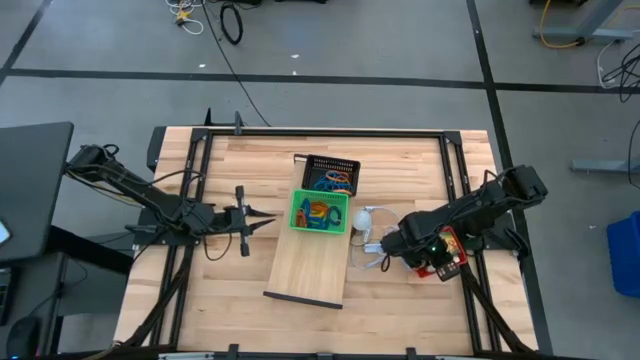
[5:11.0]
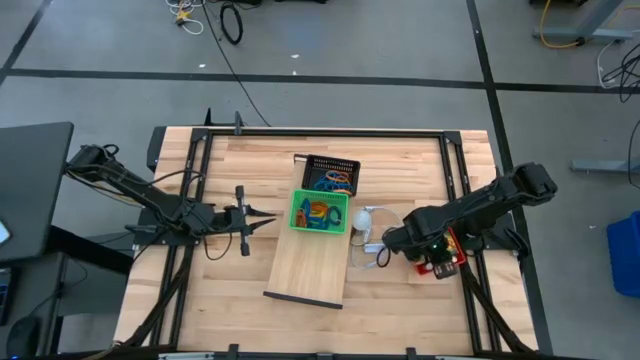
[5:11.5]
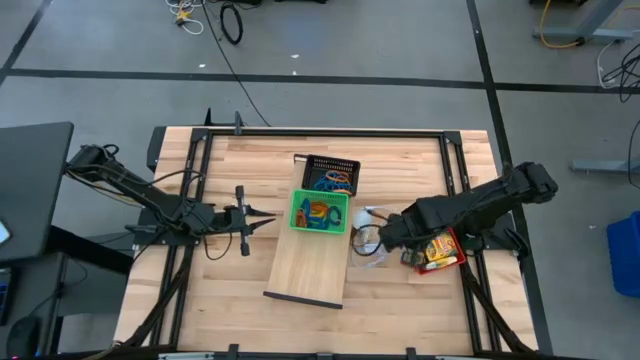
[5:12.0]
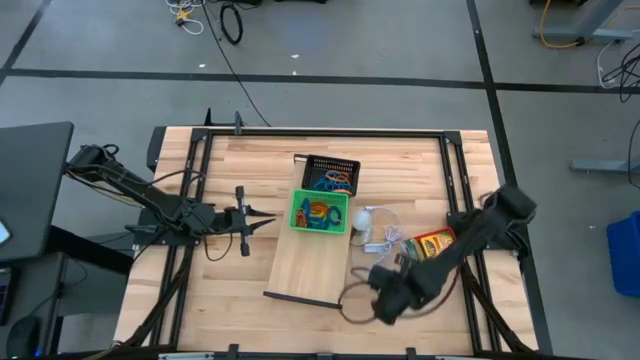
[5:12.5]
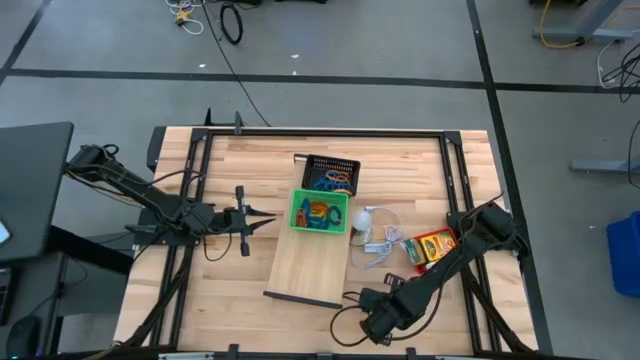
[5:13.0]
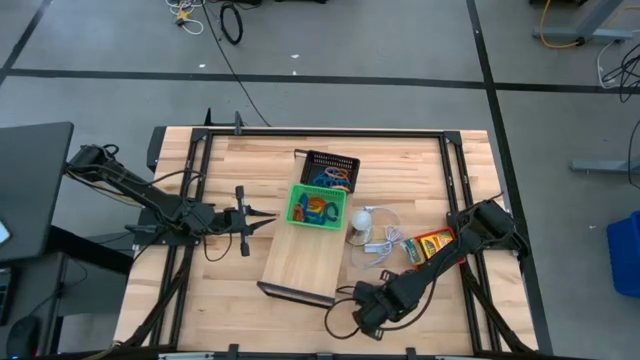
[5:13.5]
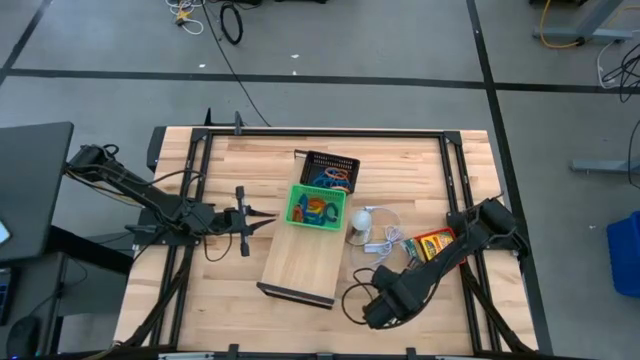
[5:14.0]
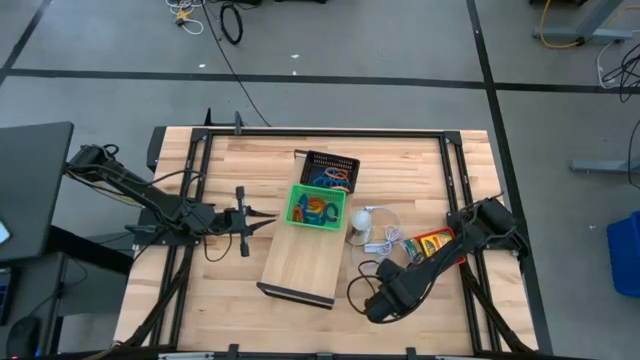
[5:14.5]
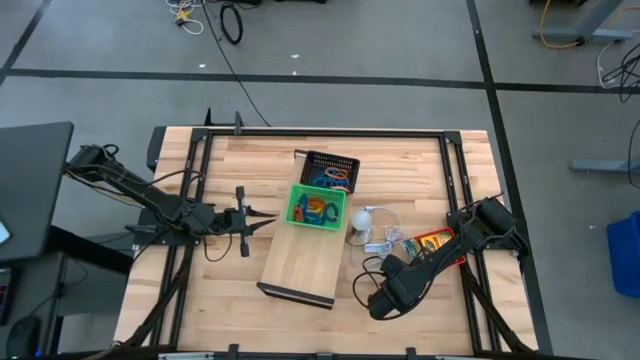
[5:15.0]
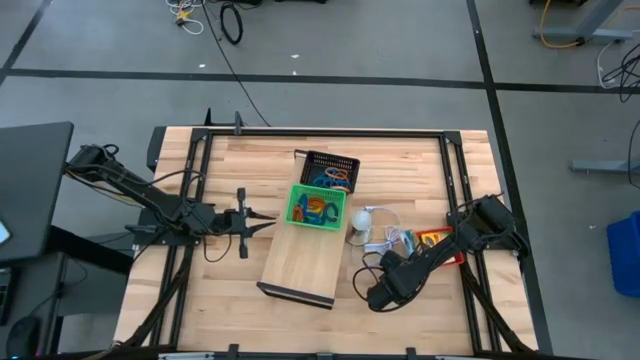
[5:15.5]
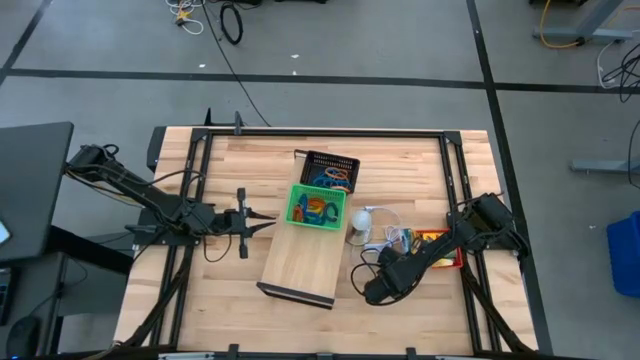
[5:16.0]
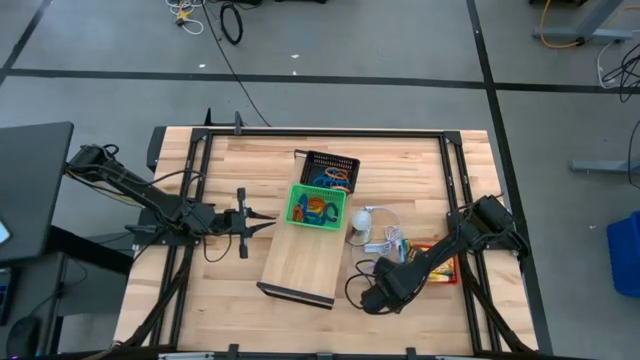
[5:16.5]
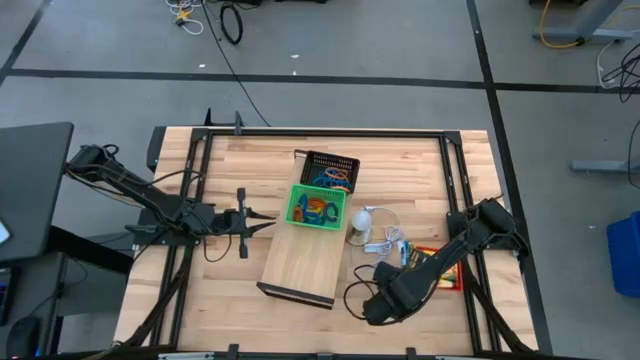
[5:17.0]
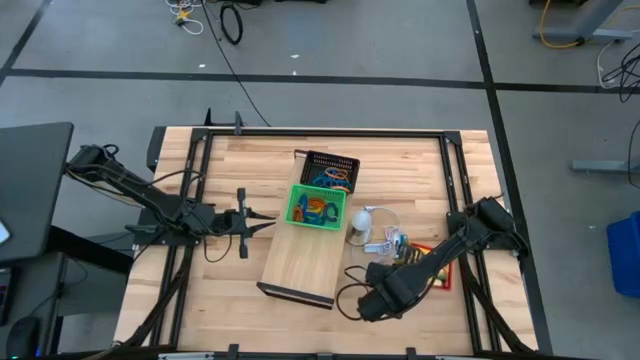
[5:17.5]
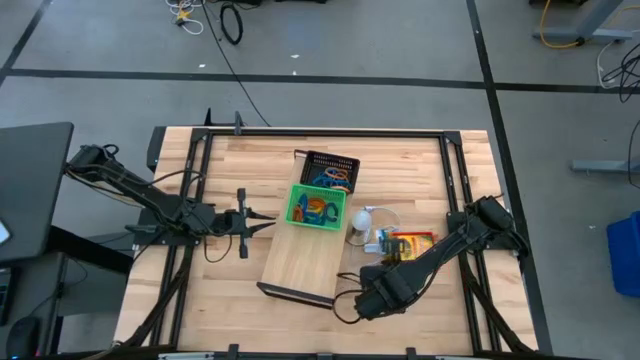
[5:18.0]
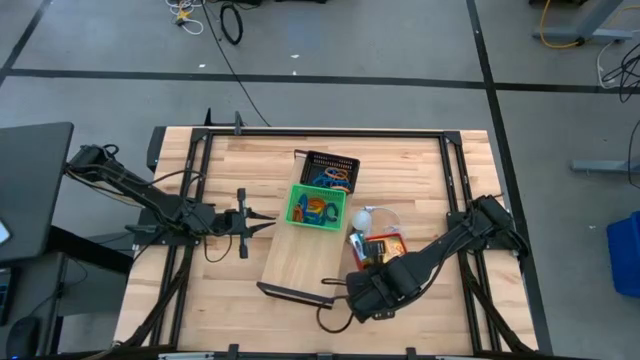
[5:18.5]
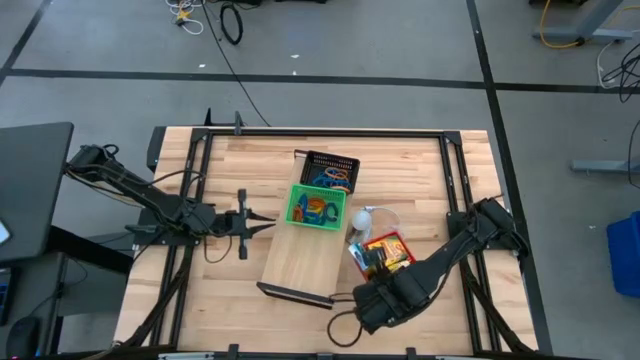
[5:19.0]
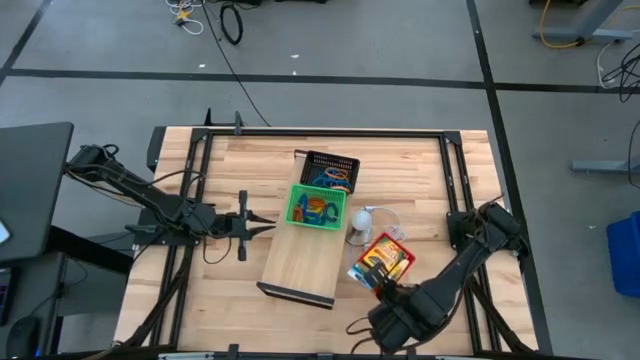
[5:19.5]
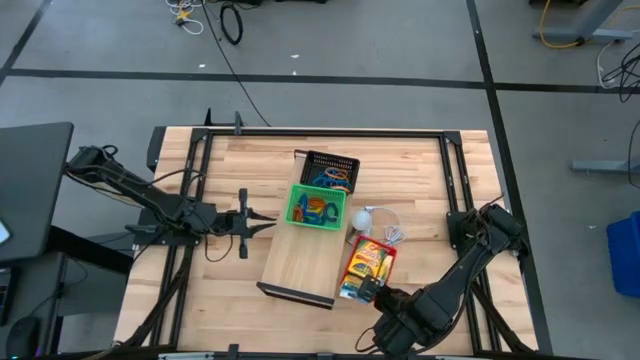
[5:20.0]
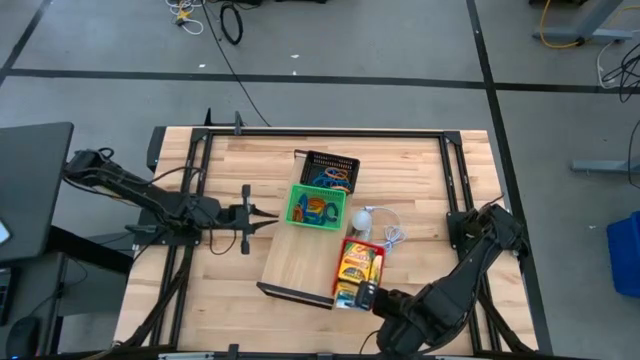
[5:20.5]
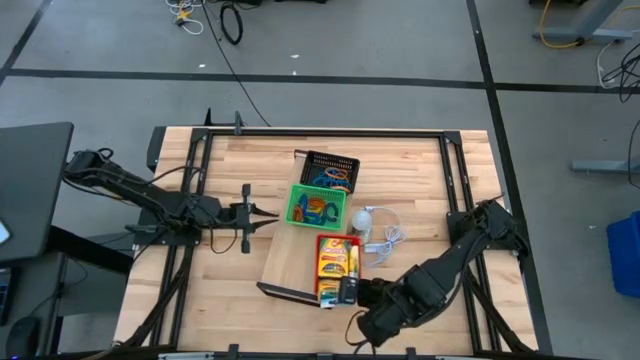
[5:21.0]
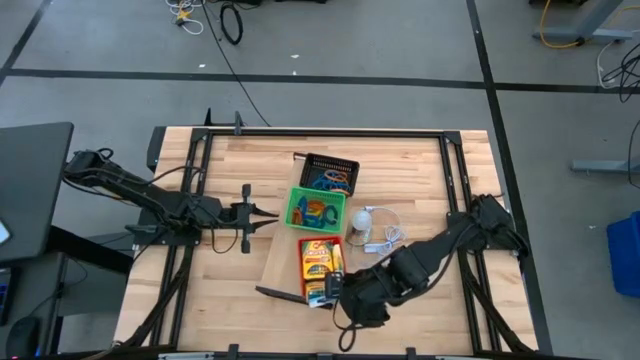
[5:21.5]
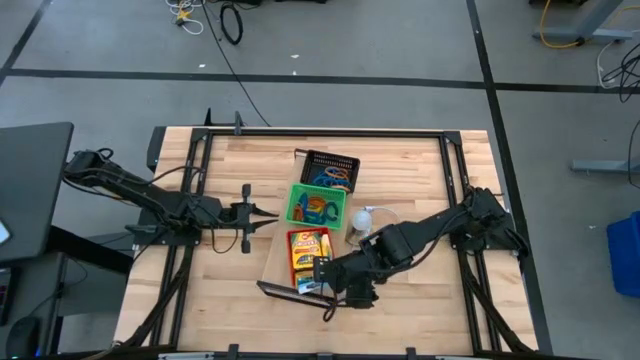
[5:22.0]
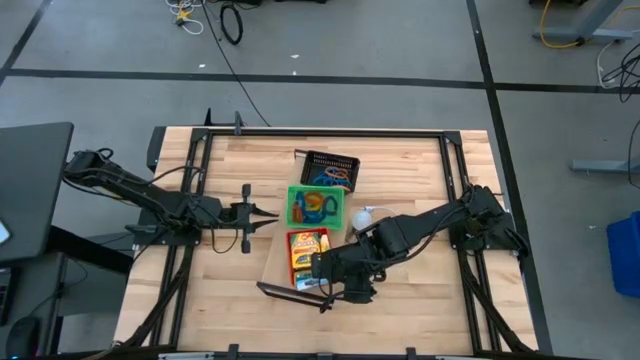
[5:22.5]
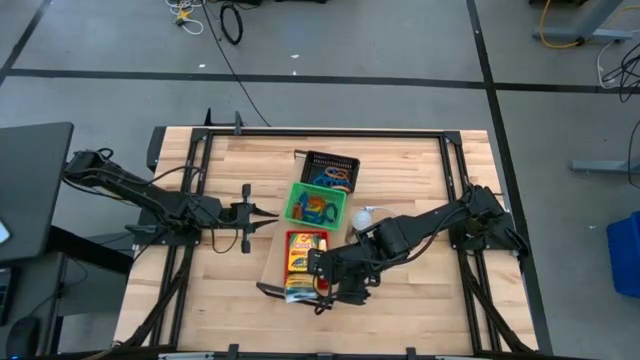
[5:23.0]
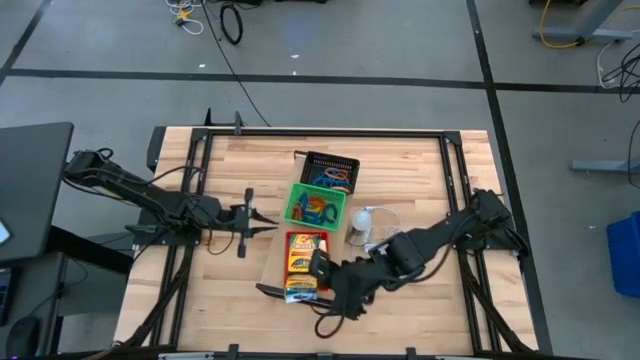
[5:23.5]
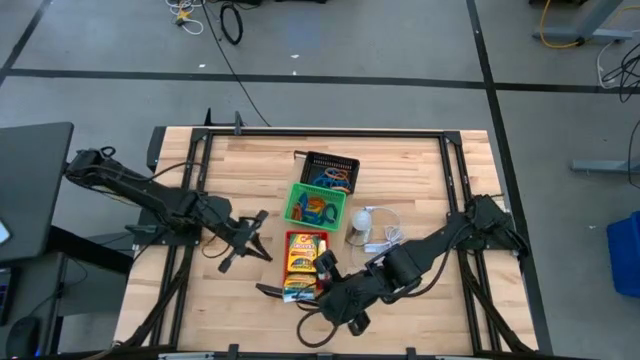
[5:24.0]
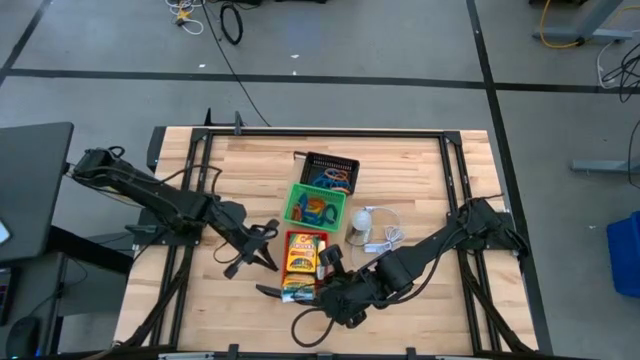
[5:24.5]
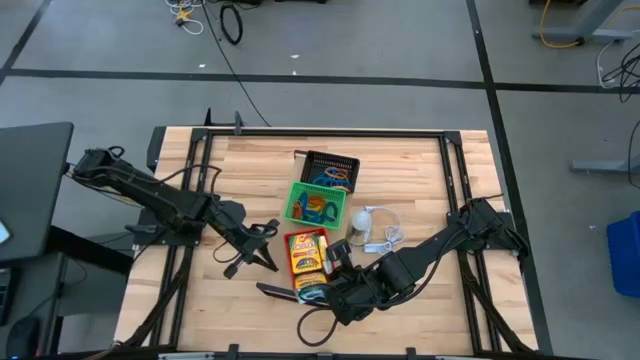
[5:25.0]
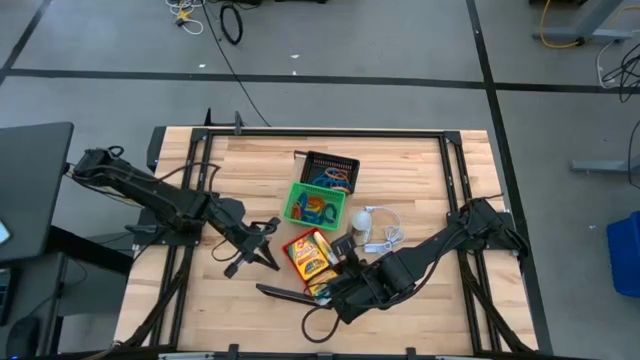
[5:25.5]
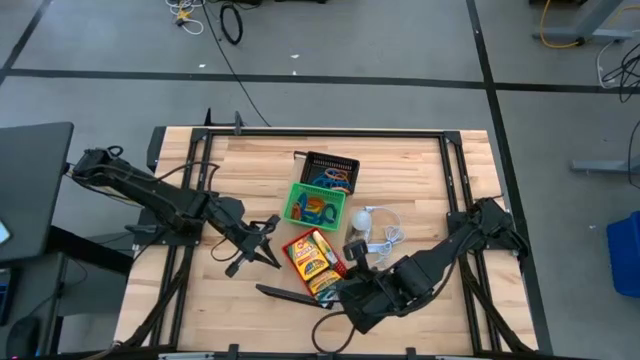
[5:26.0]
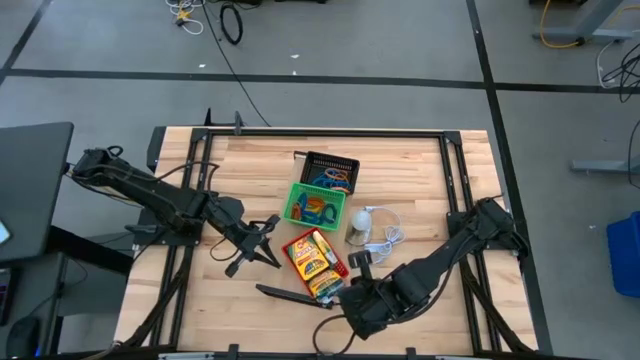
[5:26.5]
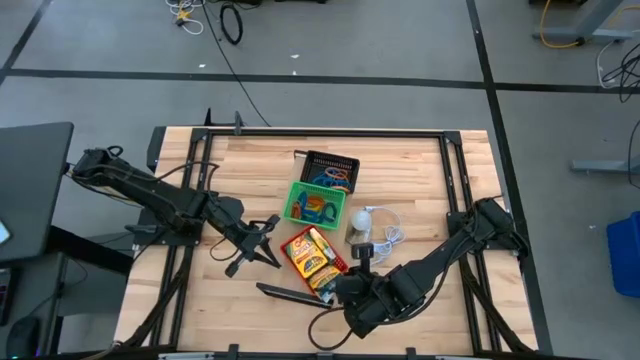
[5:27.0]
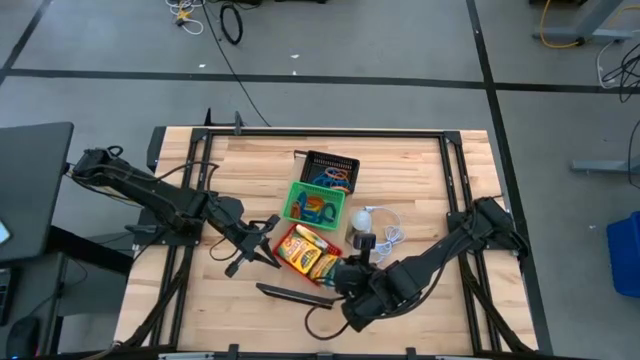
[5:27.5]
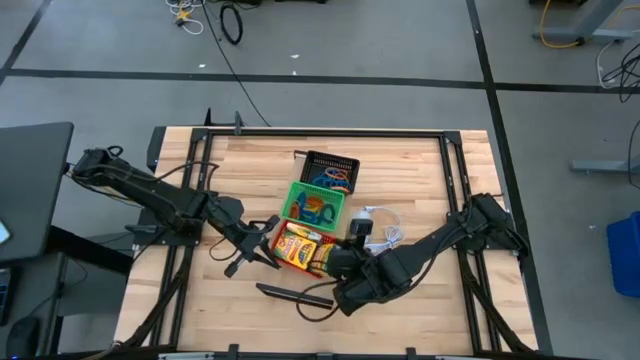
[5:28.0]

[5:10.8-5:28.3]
Task: Pick & Place Office Desk Supplies
Put the red bin on the shelf

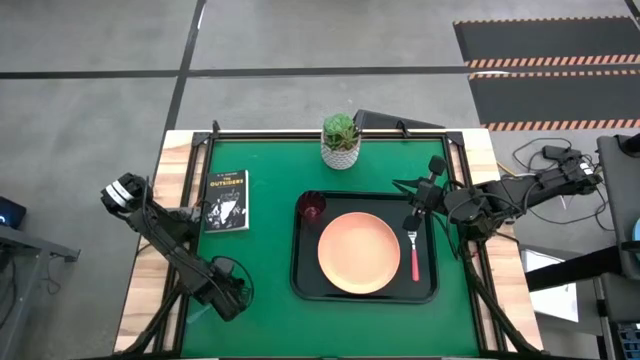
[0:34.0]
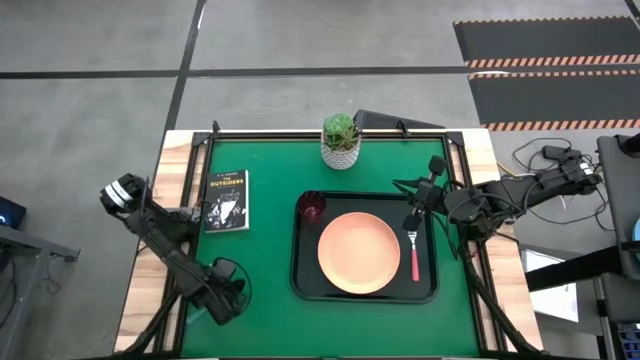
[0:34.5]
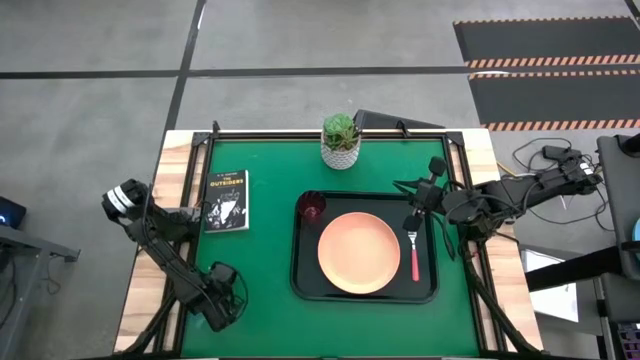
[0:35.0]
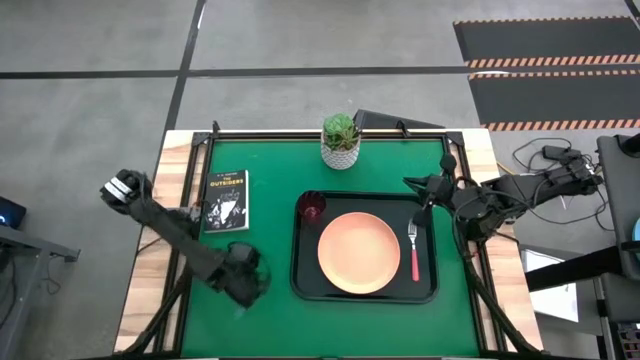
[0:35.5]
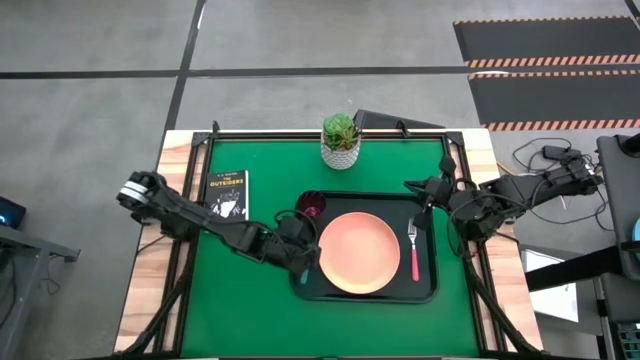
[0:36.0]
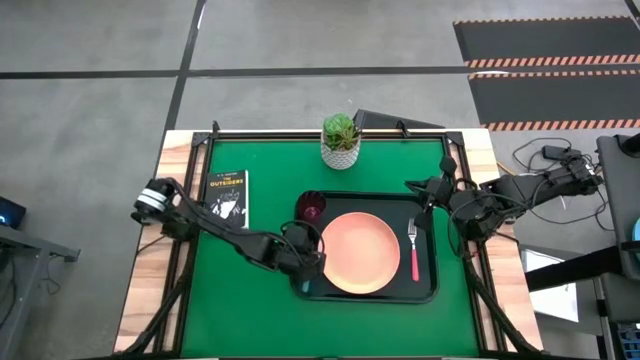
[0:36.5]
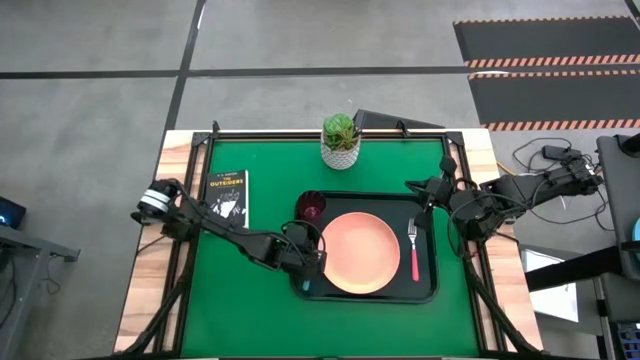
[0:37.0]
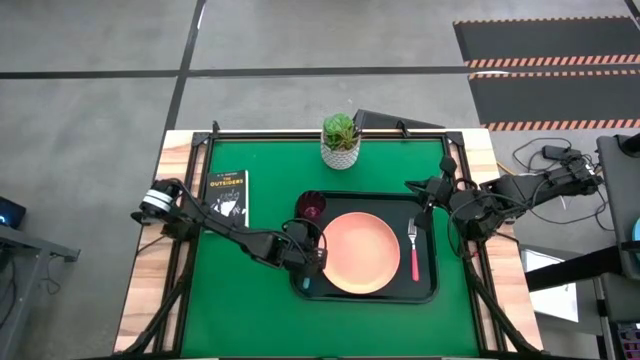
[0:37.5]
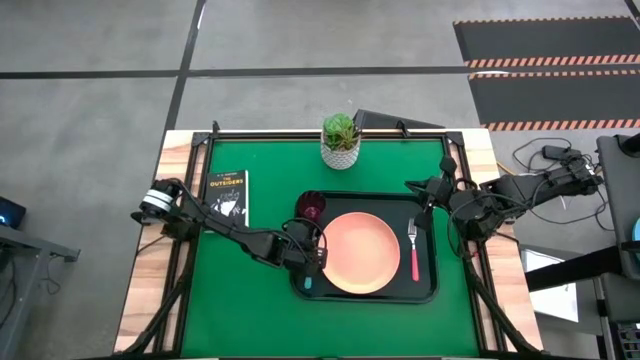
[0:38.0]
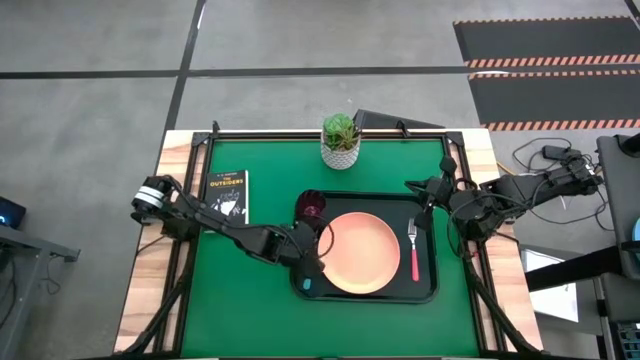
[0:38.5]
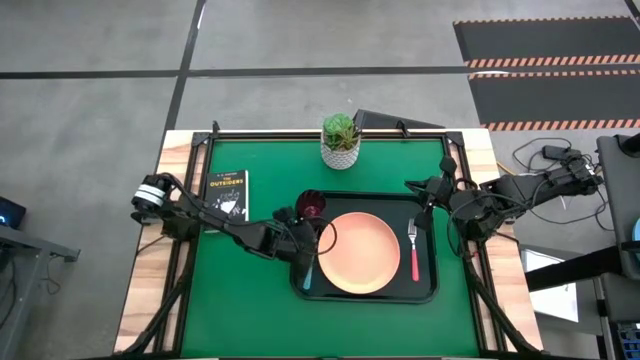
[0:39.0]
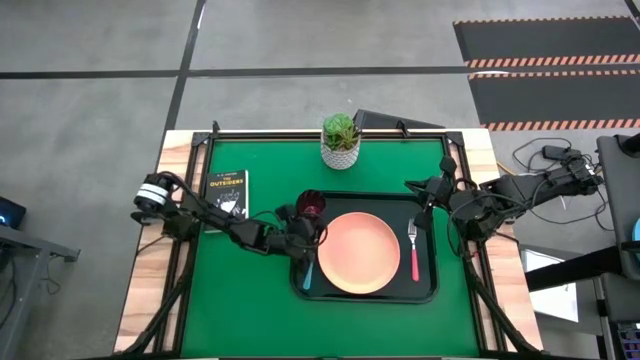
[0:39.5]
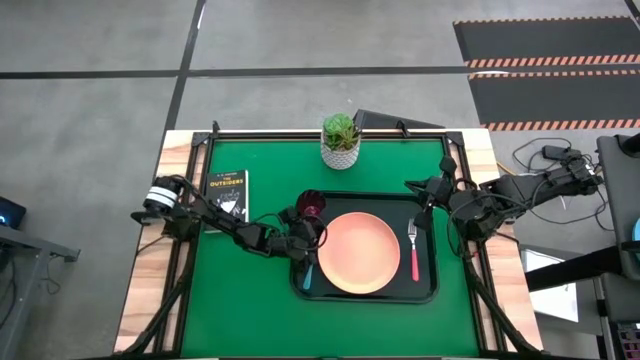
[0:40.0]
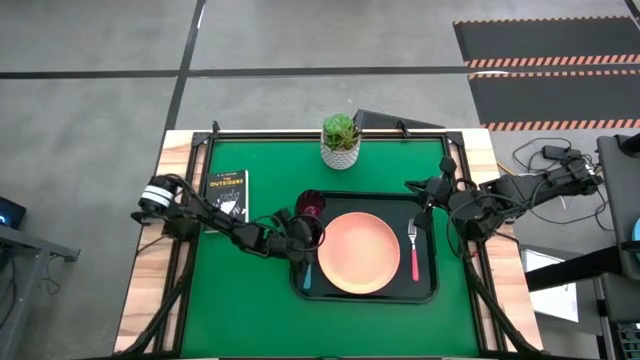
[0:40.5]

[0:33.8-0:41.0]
Task: Pick and place plate/cup/fork/spoon on tray
Put the light blue spoon on the black tray at the left of the light orange plate
